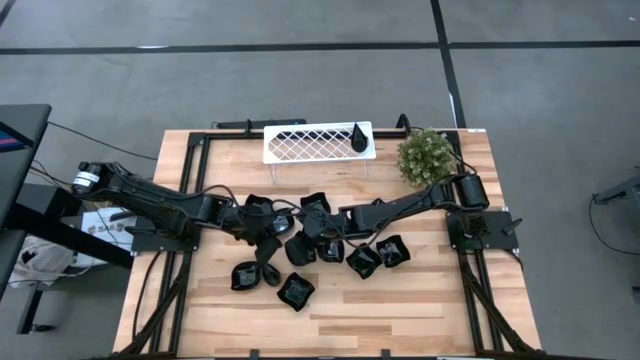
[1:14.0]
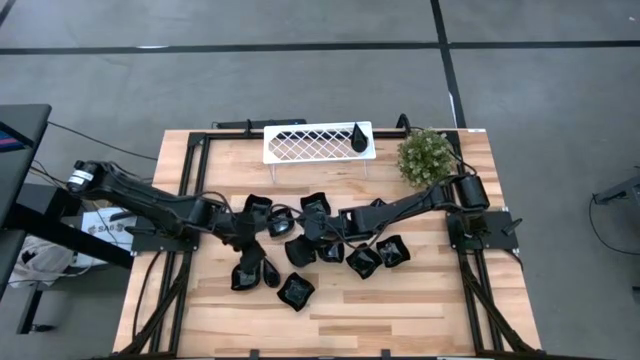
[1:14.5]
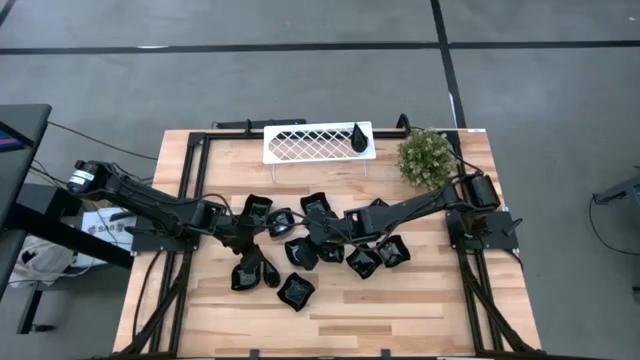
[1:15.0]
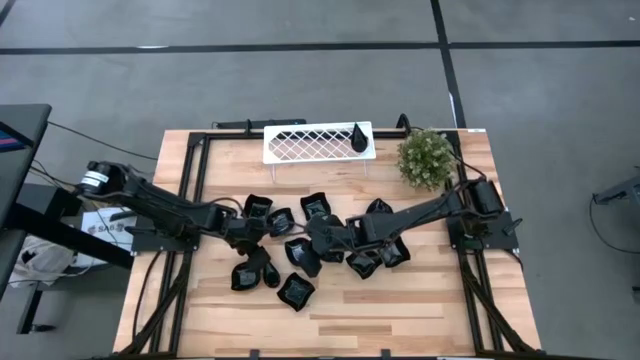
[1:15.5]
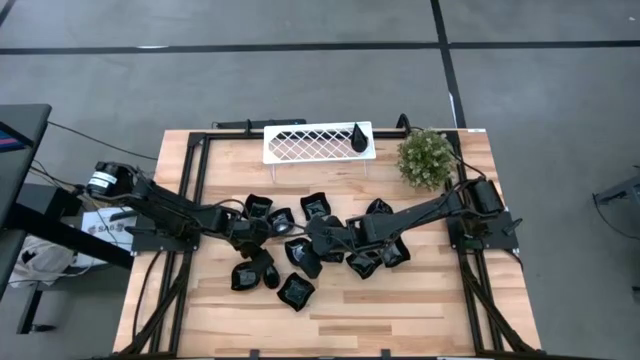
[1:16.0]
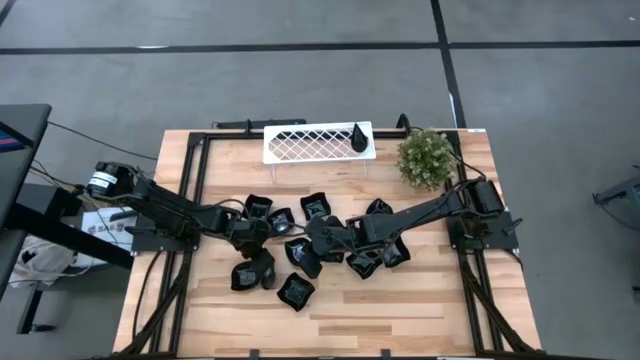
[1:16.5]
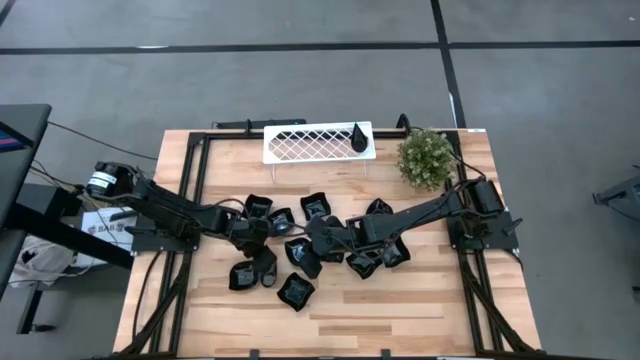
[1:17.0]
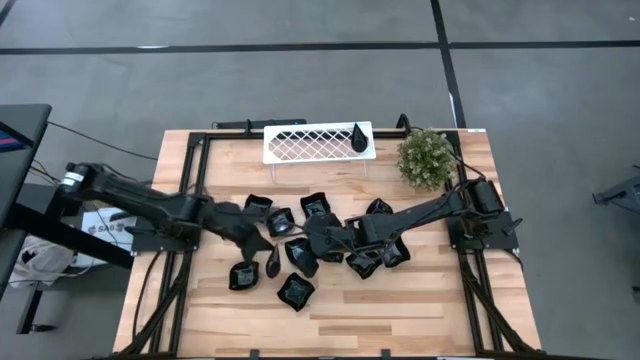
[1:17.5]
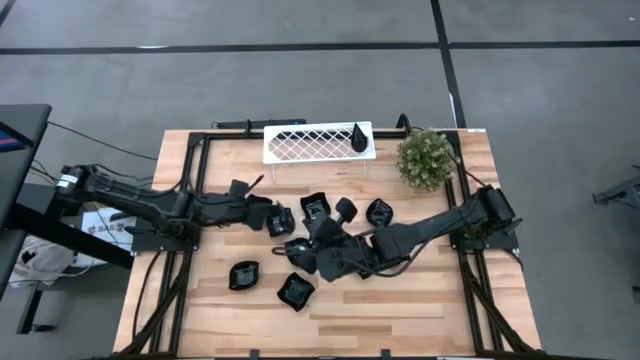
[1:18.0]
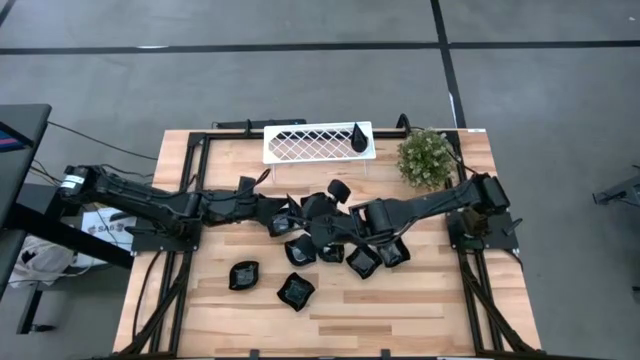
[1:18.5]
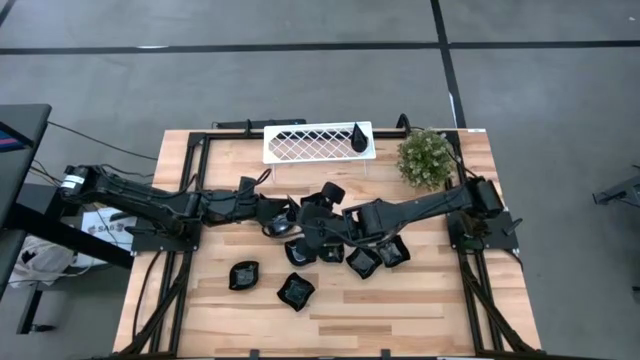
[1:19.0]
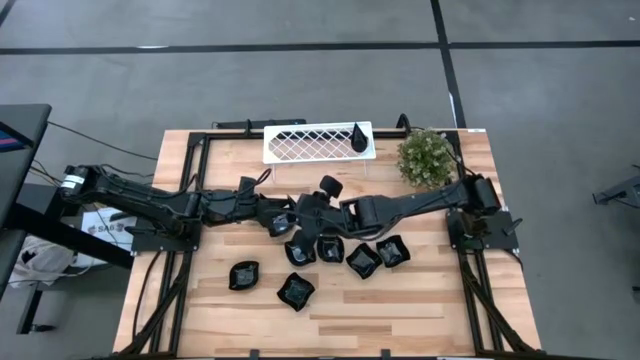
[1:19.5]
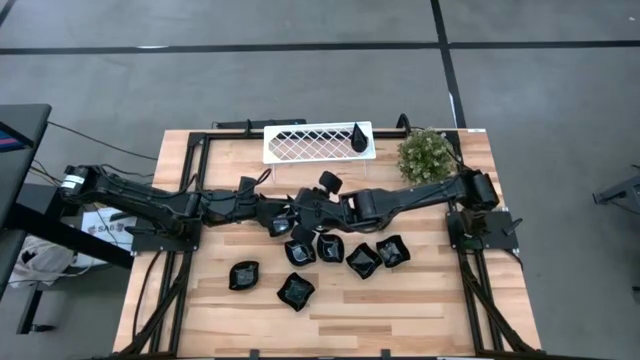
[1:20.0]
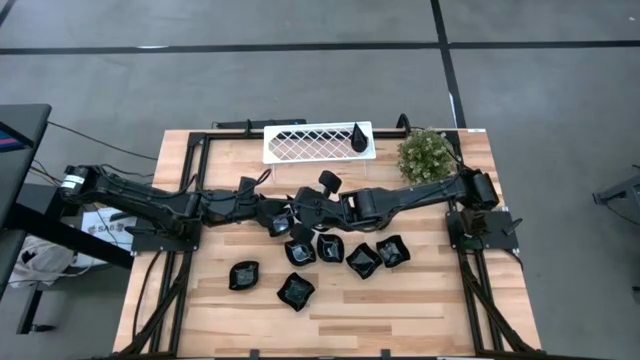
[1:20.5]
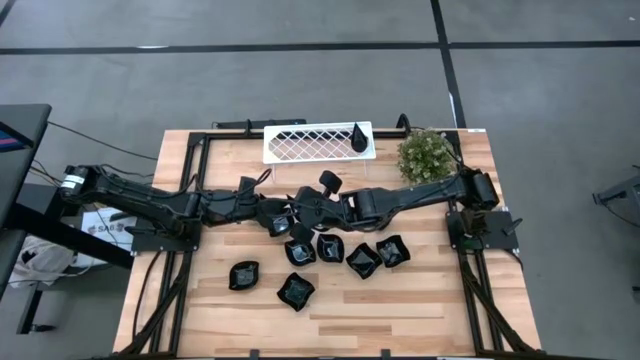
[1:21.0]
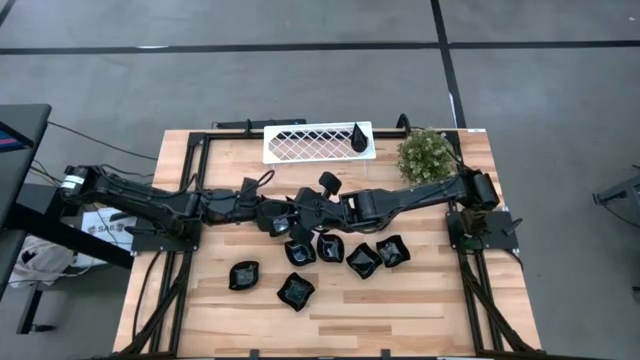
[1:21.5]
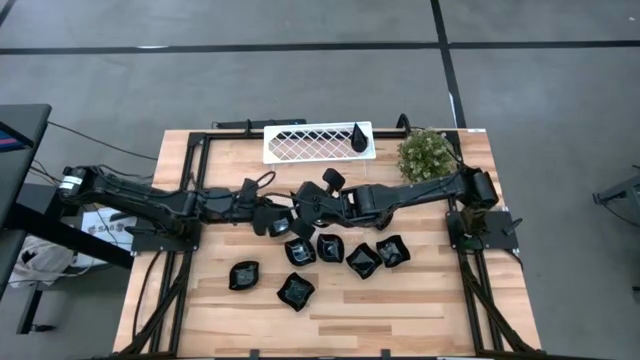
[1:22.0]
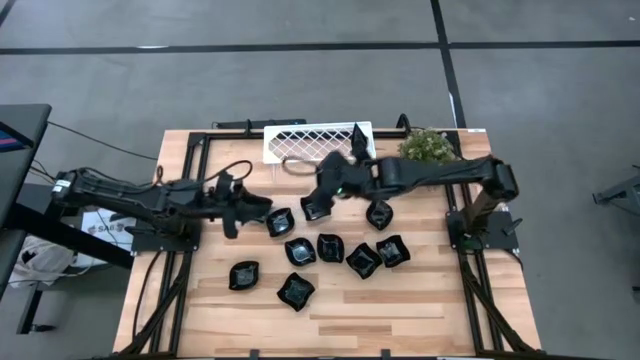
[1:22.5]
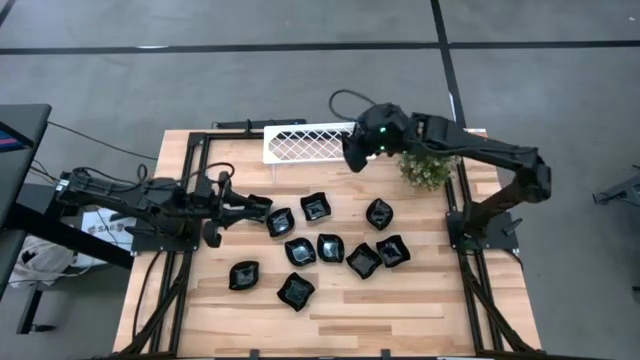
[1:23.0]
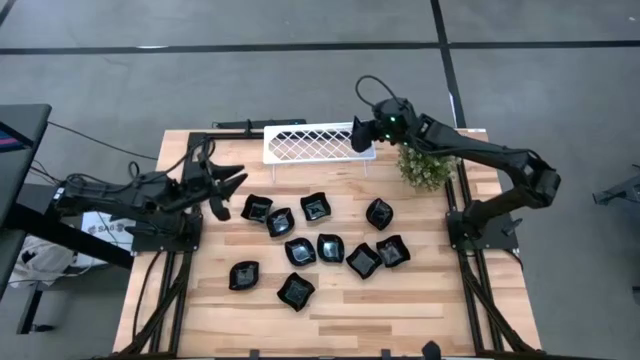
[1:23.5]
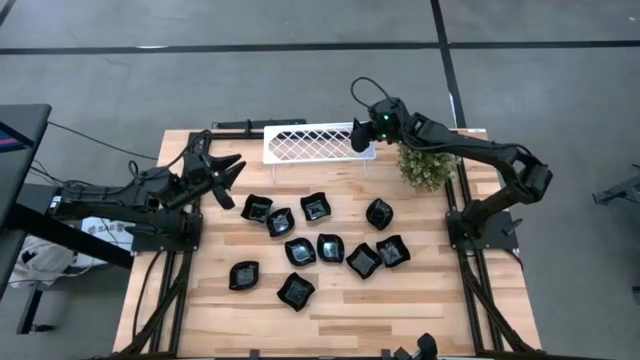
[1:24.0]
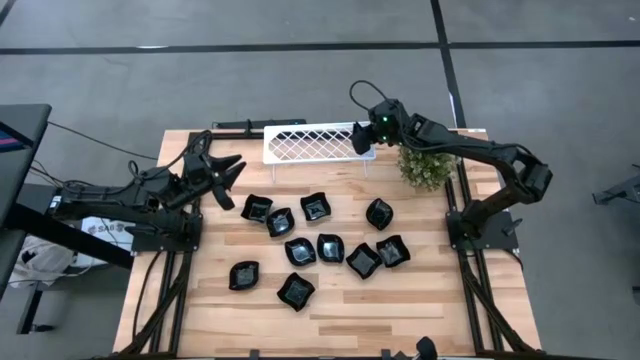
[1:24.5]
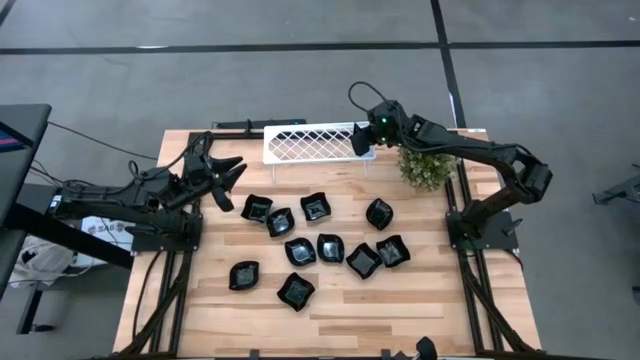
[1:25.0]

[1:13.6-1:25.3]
Task: Pick & Place Mini shaped plates
Stack the black drop shaped plate on top of the black drop shaped plate on the shelf

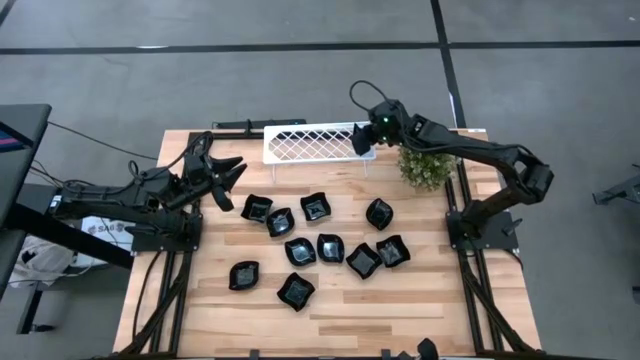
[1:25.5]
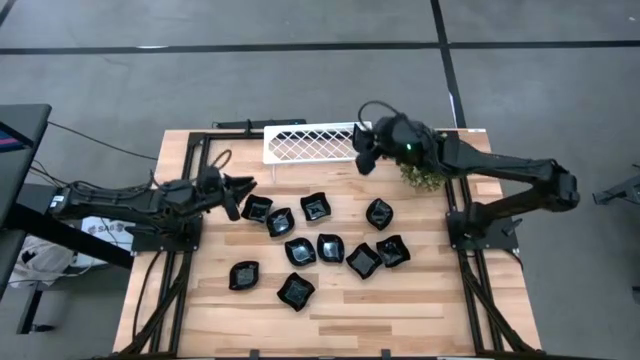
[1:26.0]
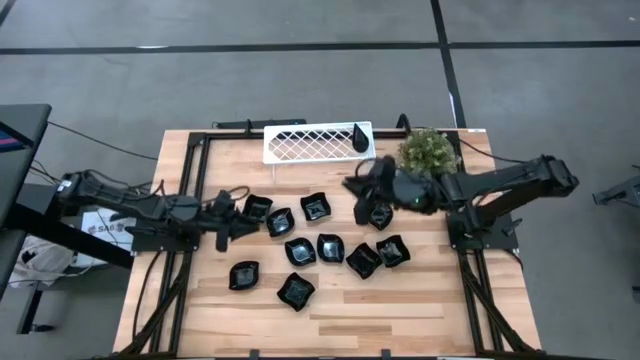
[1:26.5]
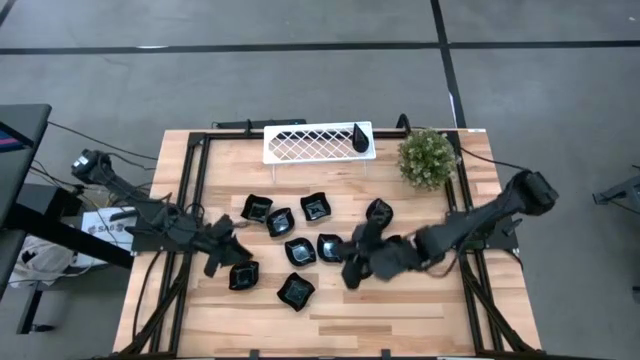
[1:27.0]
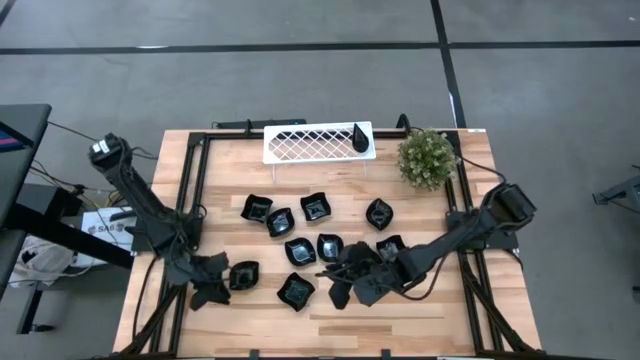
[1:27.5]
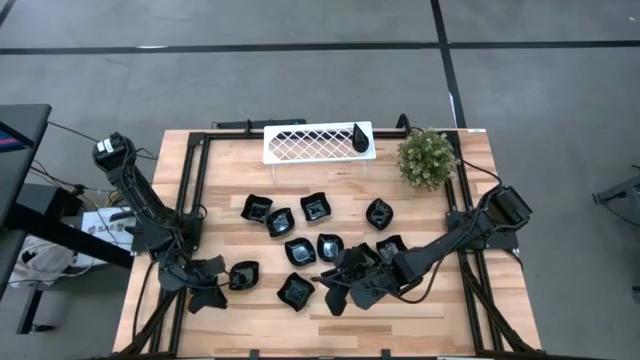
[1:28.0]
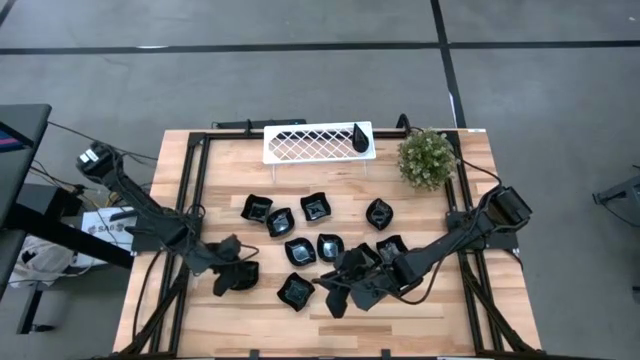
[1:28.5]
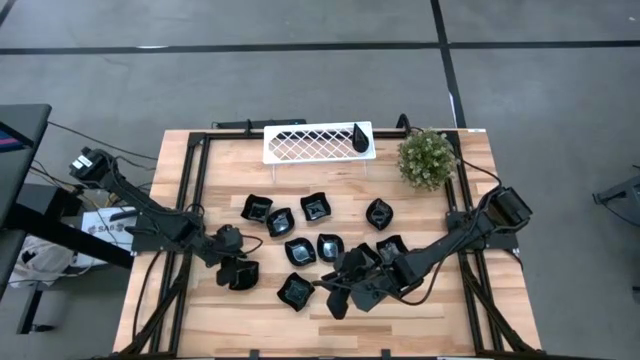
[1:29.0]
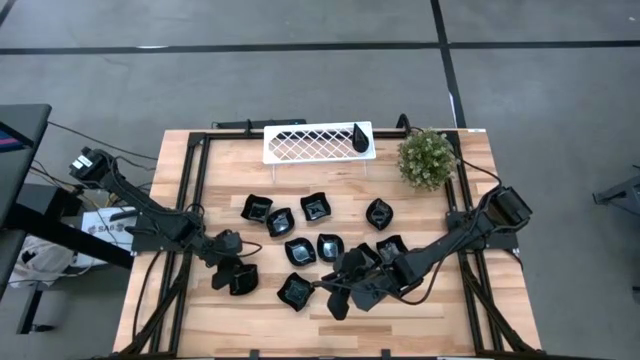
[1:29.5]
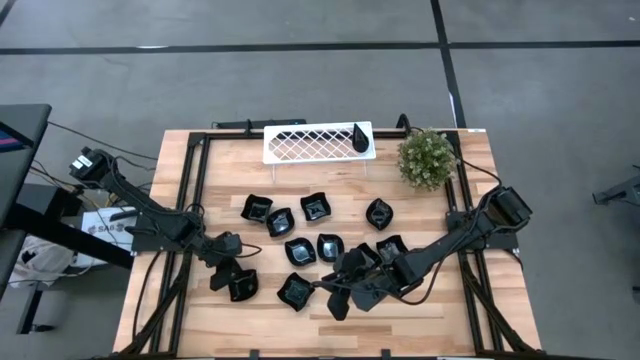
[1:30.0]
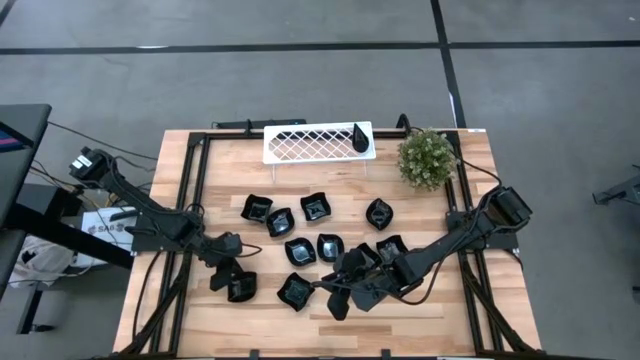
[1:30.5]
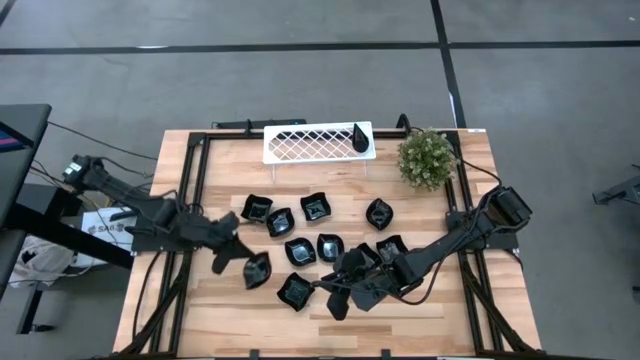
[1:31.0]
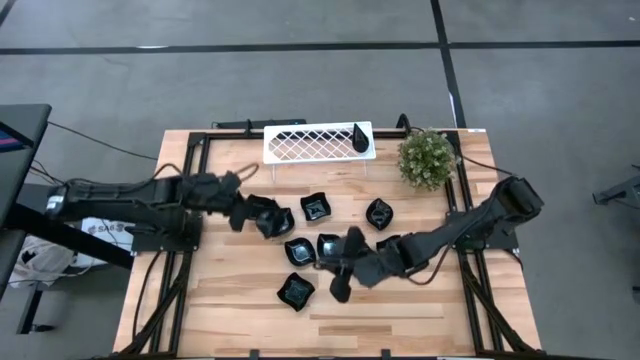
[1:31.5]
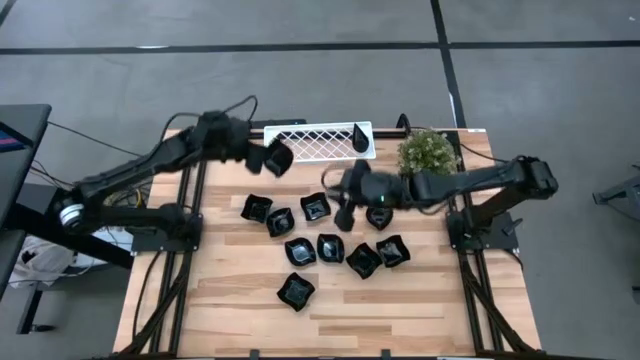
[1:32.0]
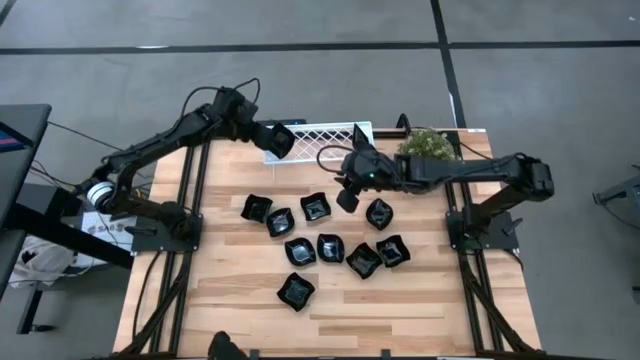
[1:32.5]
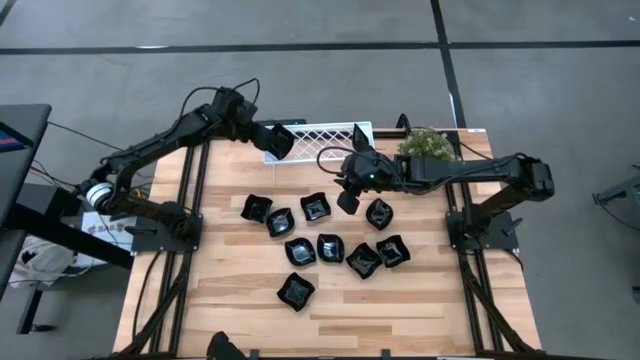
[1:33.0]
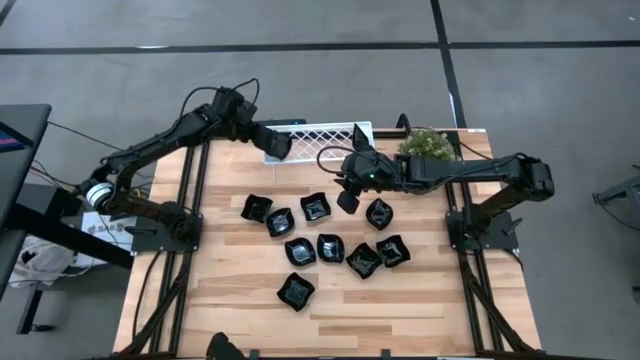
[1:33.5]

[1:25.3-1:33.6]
Put the black leaf shaped plate on the shelf

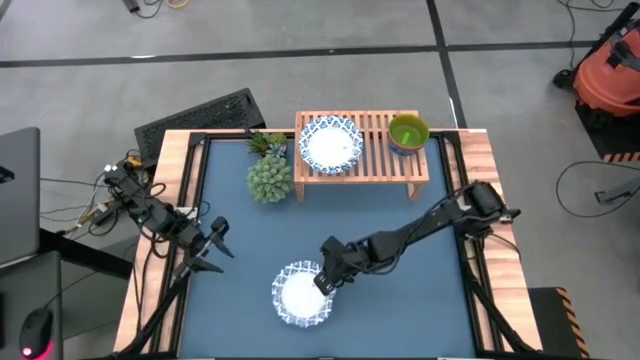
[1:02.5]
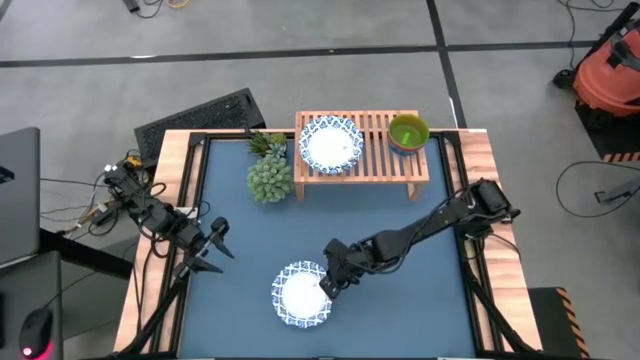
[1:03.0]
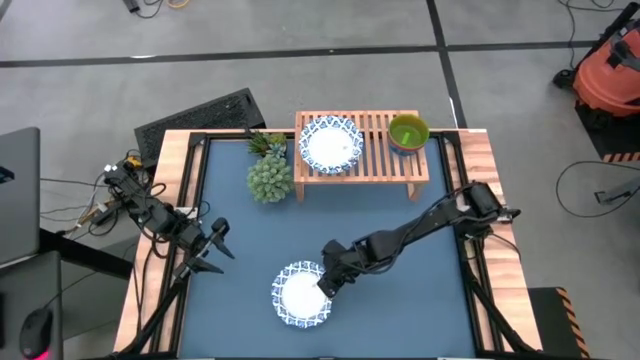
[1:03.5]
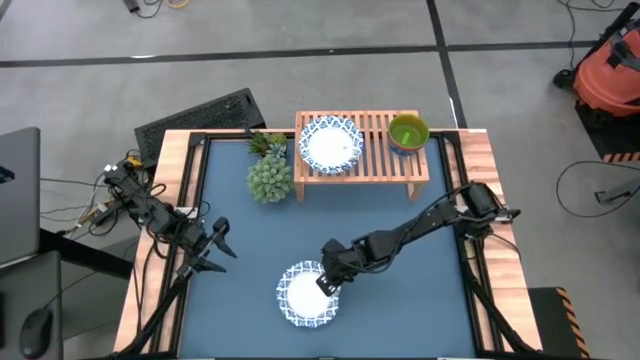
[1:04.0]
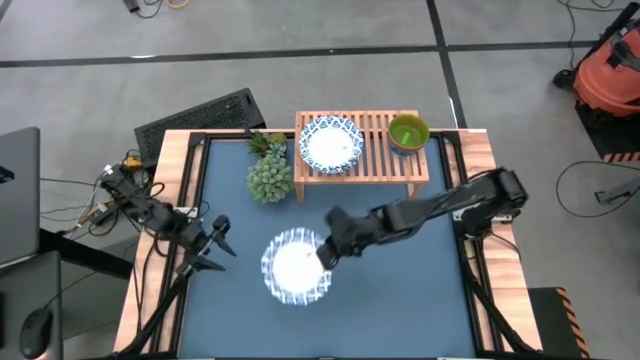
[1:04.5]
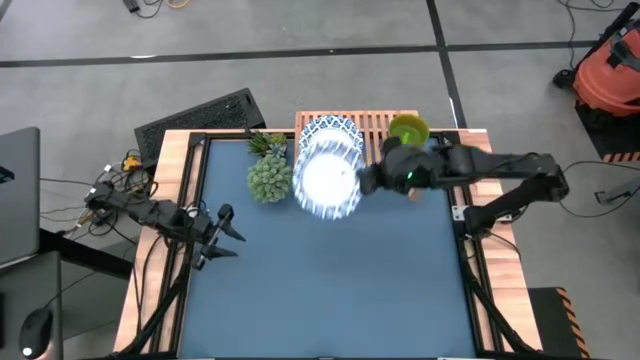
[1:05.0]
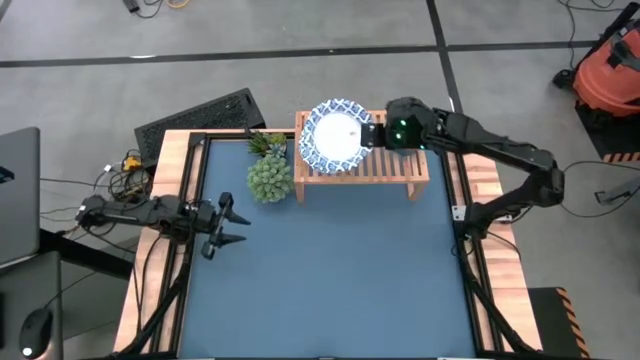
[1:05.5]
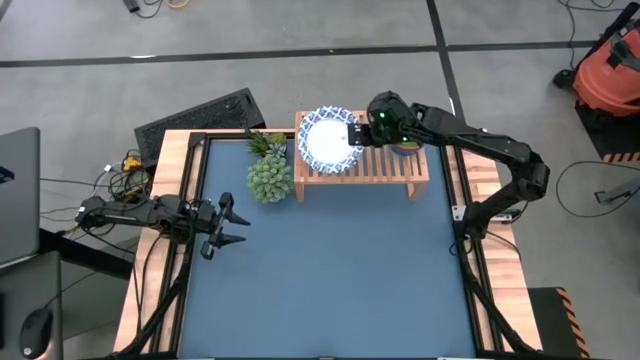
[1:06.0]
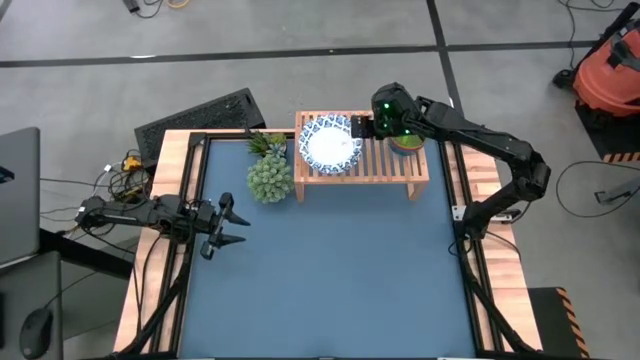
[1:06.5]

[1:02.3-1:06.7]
Task: Place and stack bowls onto a shelf
Stack the white bowl on top of the white bowl on the shelf
